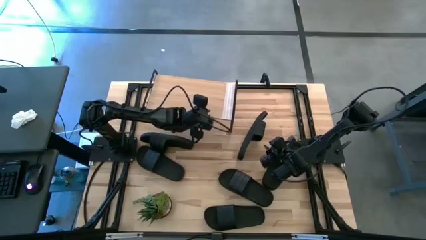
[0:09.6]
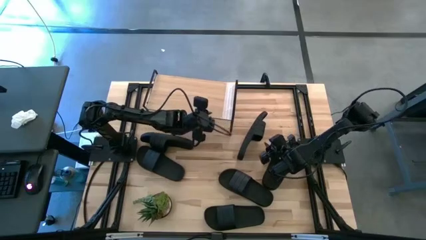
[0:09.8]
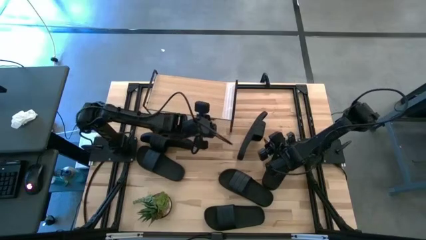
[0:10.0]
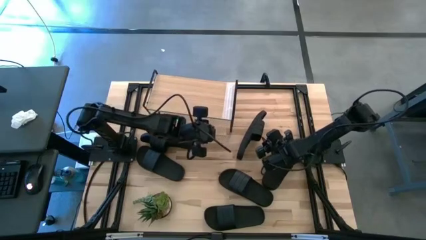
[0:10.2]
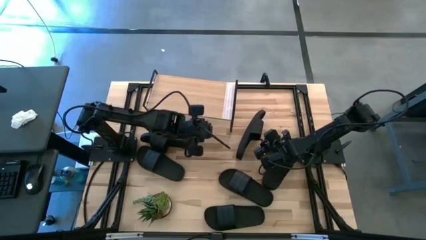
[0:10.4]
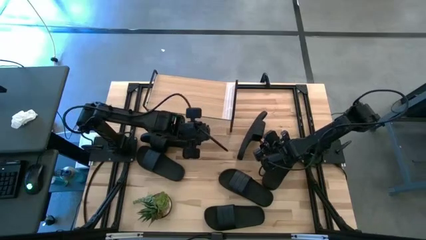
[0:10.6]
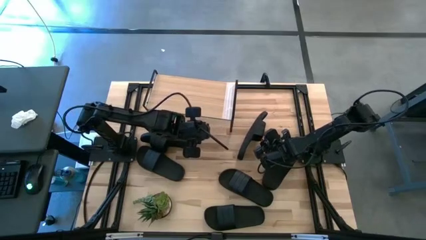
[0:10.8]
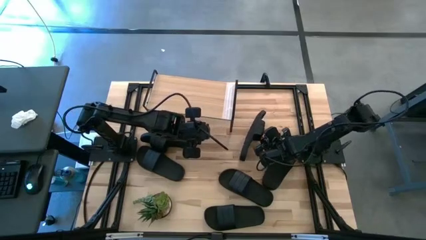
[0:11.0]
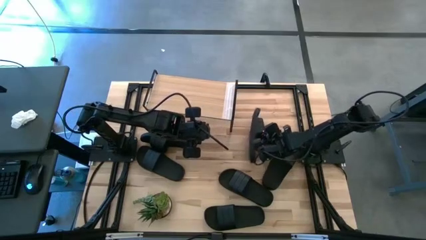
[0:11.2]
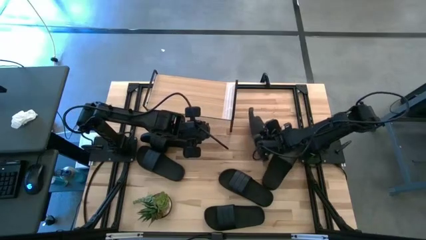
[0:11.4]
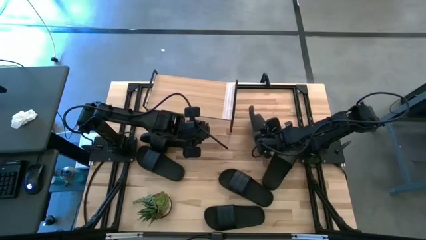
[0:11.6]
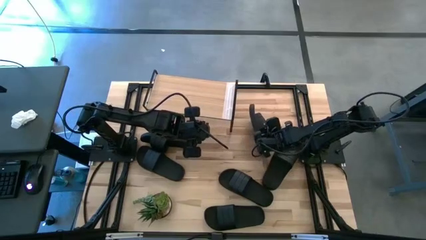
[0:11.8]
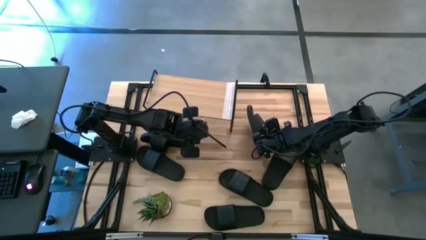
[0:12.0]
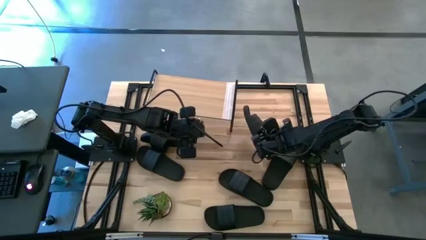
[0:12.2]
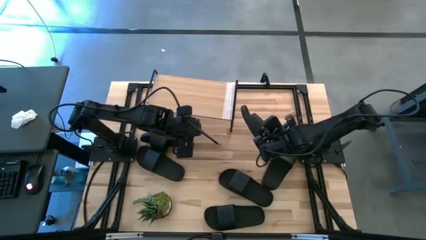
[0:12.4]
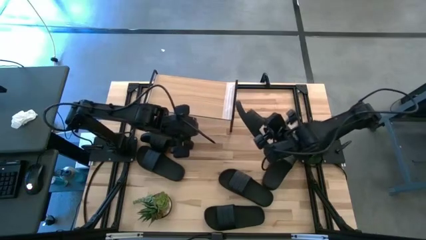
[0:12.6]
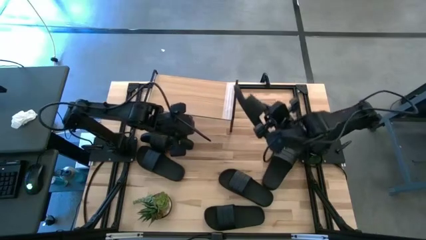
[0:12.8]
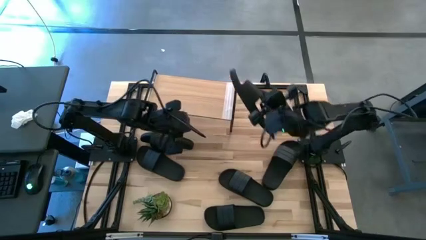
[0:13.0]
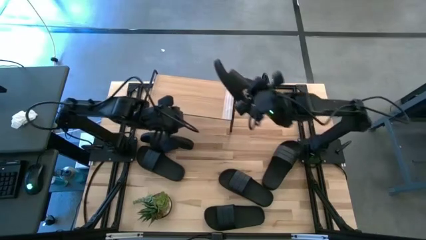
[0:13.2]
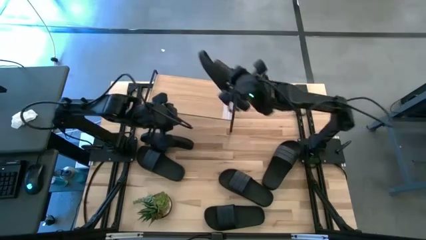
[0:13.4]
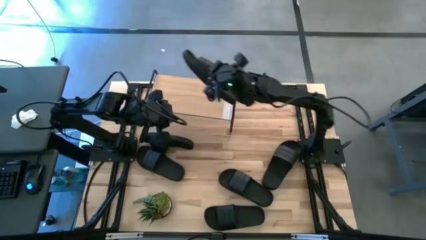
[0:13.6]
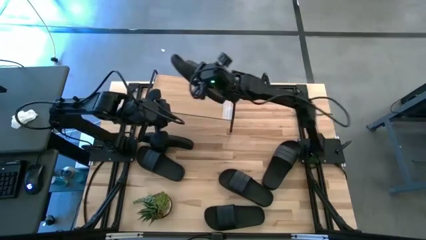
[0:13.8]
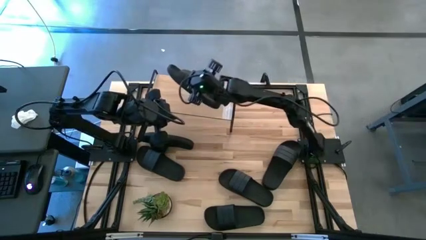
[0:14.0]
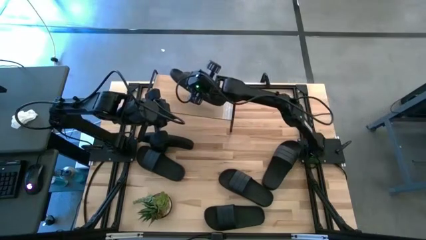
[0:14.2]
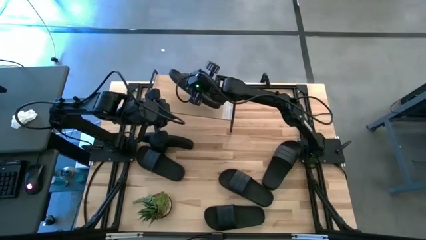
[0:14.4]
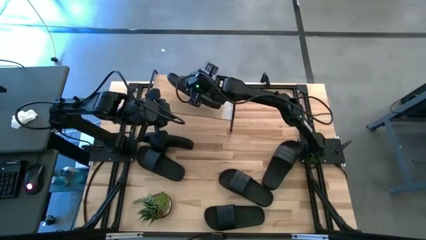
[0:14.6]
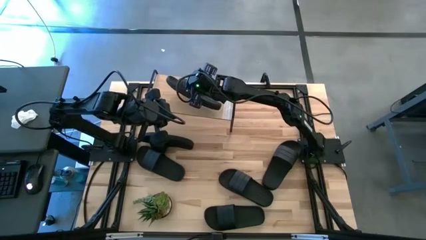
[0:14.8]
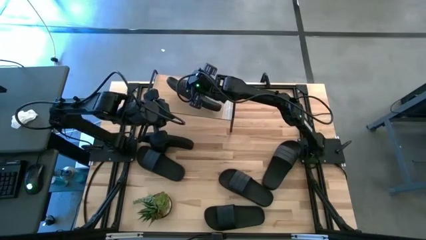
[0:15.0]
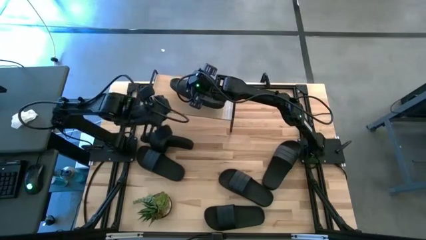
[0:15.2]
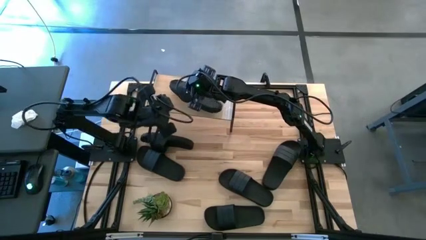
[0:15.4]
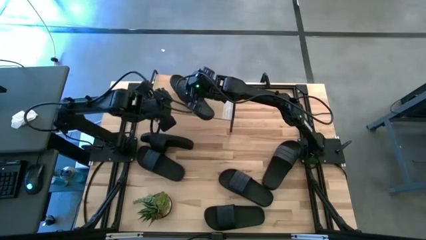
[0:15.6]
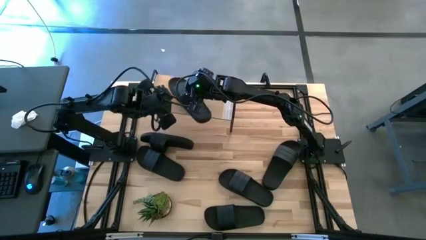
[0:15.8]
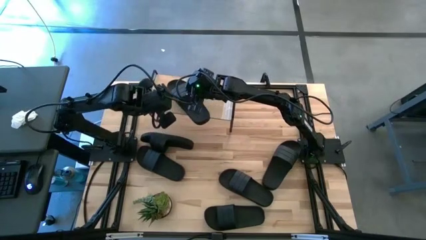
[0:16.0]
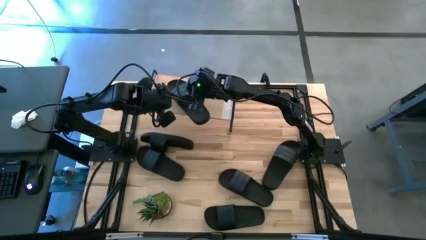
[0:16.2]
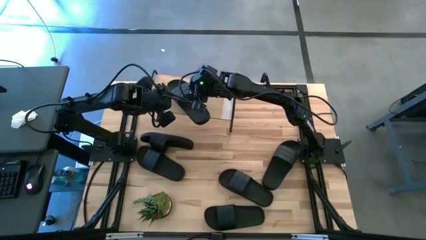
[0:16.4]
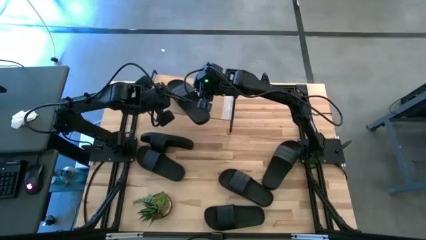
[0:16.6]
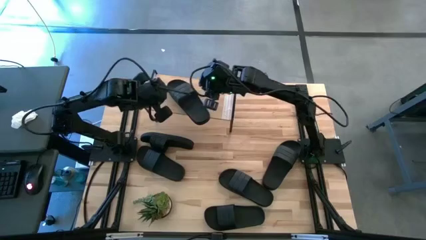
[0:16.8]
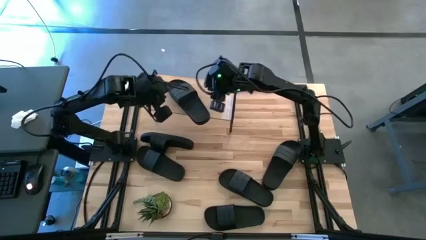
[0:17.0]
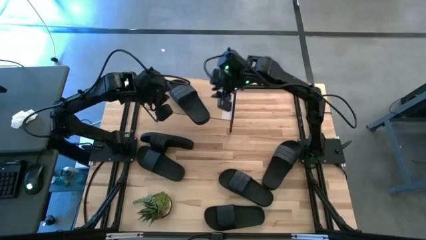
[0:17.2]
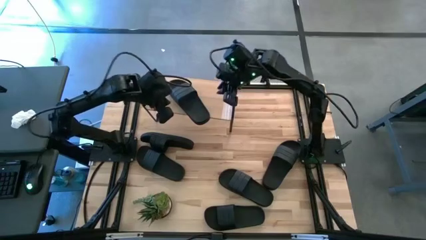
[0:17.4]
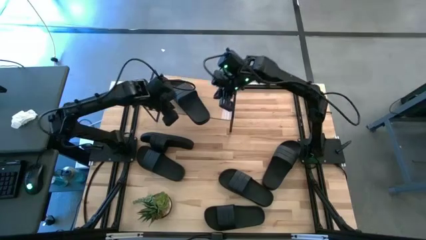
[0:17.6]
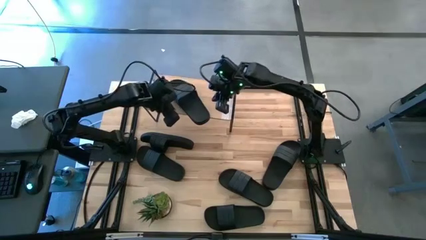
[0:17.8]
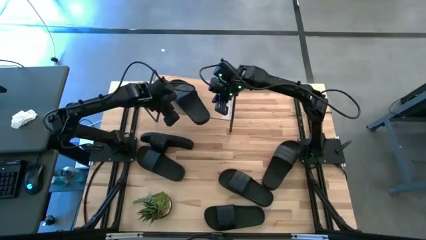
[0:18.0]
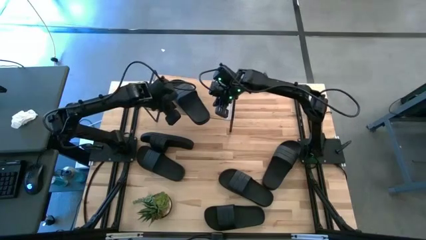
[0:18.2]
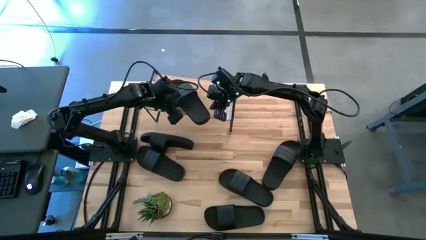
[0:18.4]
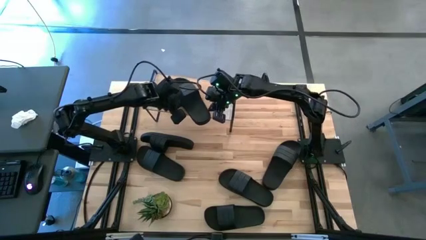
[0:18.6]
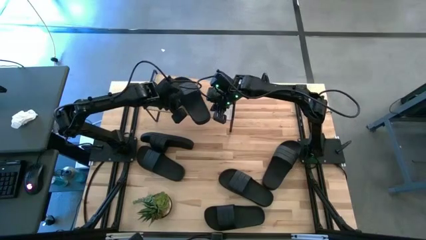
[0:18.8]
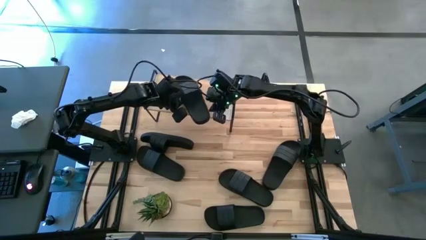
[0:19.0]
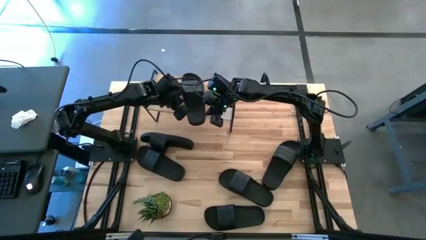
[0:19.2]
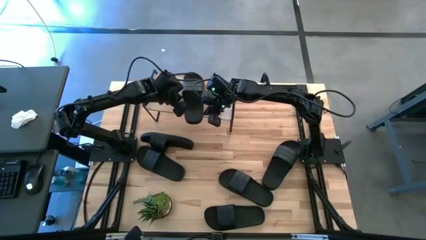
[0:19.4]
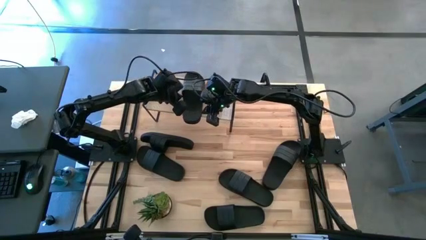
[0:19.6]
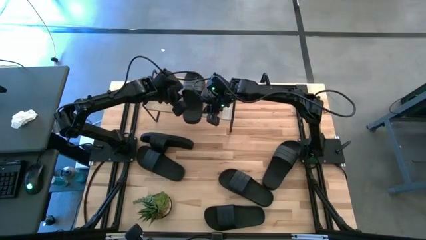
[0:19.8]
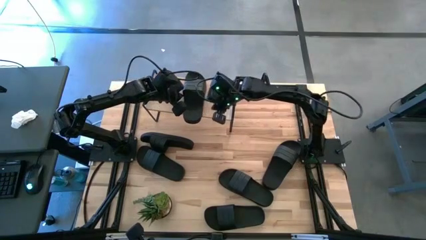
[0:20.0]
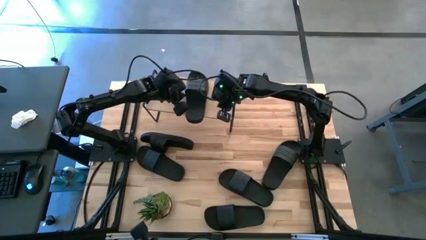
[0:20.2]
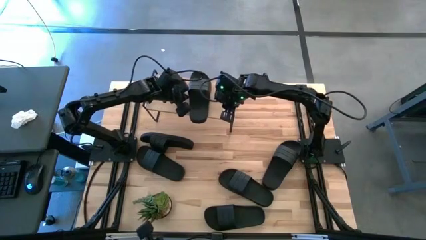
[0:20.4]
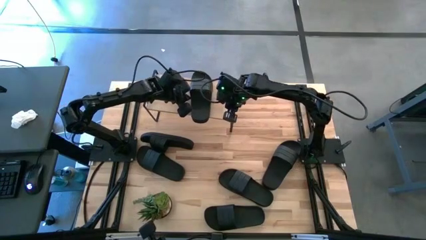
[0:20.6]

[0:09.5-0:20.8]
Task: Pick and place slides into the shelf
Put the black slide on the shelf
